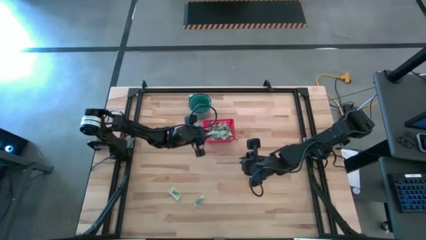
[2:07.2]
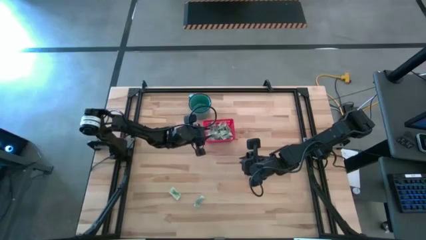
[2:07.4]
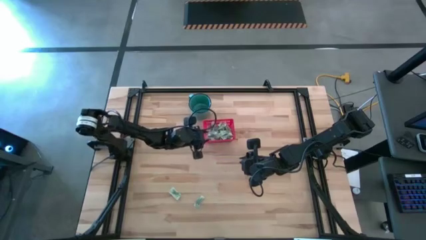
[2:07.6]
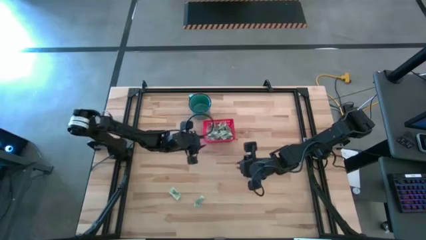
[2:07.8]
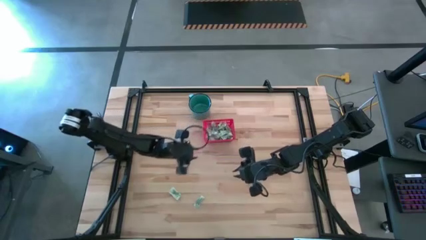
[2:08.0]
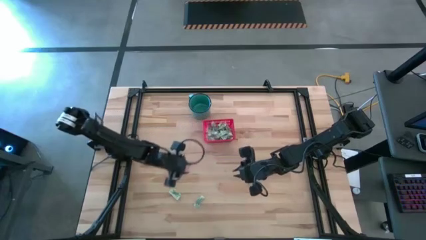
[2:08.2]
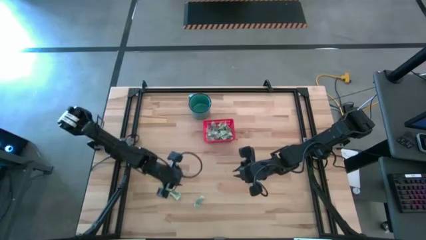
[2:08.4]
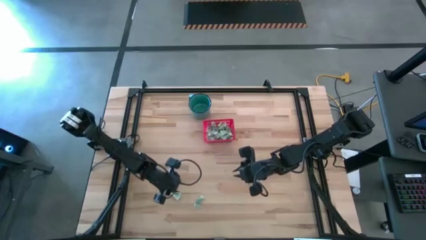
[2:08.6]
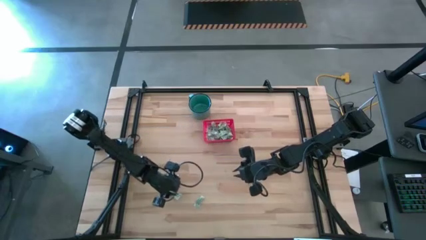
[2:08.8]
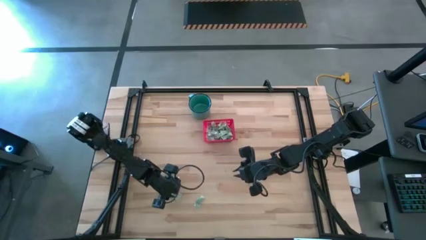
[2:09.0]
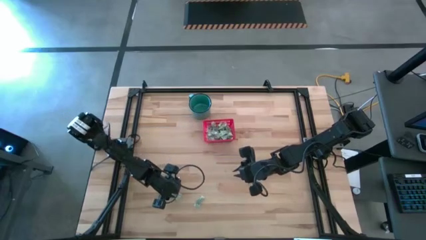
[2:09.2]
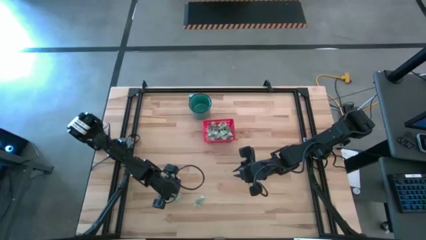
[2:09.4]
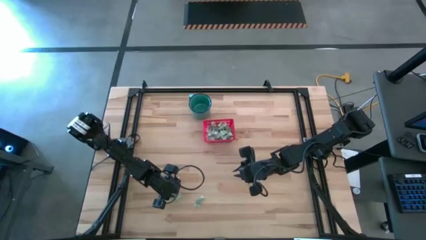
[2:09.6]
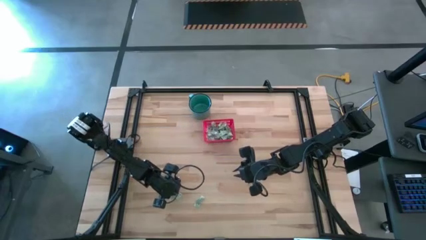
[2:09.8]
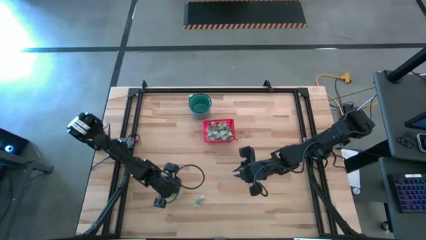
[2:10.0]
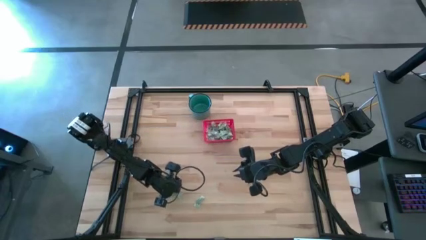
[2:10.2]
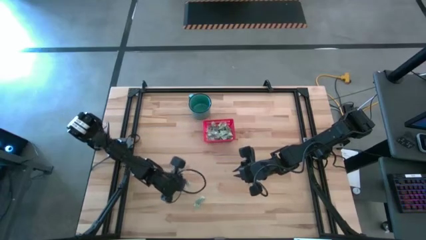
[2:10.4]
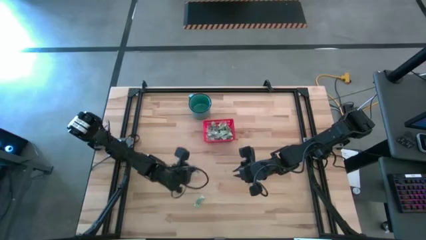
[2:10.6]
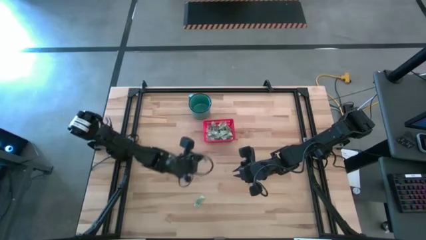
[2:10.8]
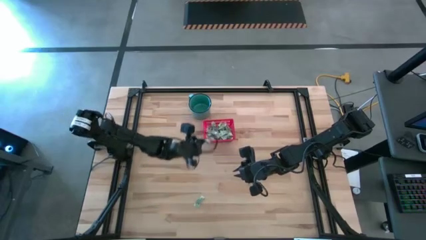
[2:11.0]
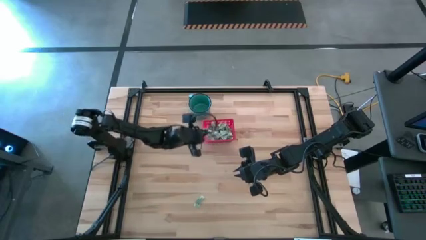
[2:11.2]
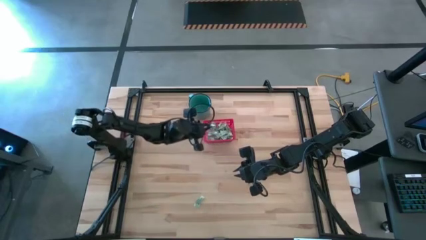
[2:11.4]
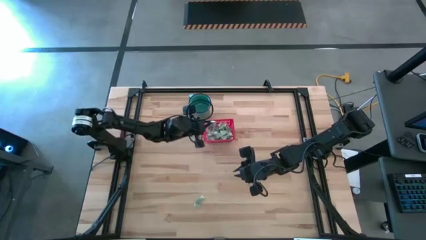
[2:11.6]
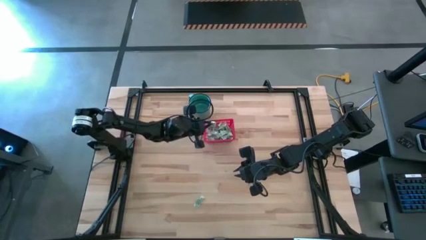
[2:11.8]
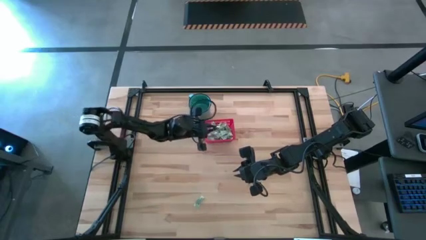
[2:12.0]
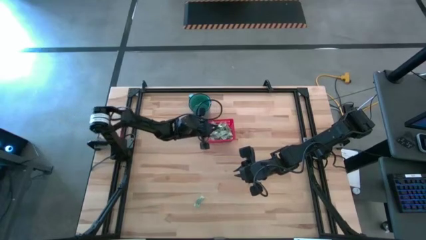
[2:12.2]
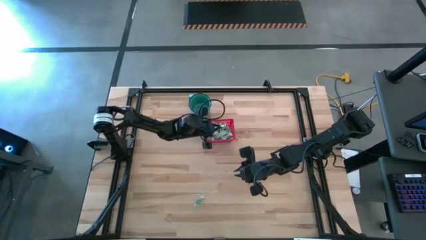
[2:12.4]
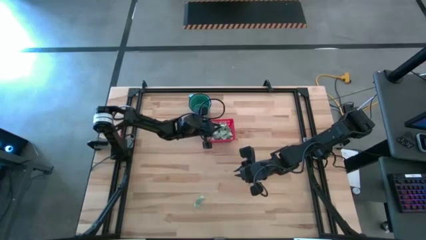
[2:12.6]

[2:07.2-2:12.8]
Task: Pick and place items into bin
Put the light green stevia packet into the red bin

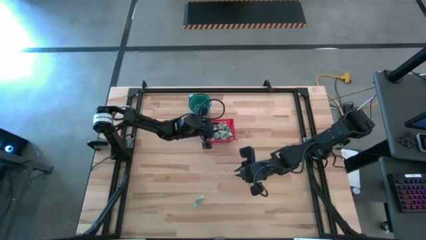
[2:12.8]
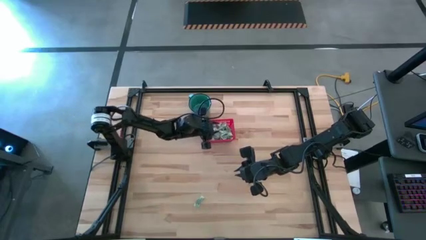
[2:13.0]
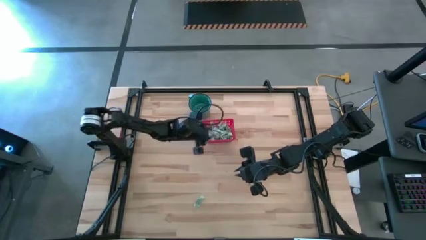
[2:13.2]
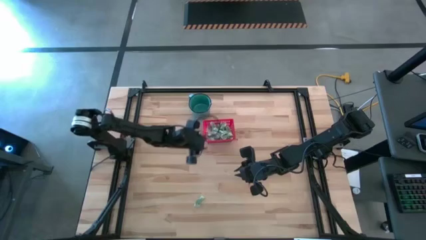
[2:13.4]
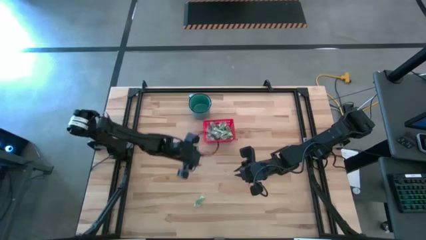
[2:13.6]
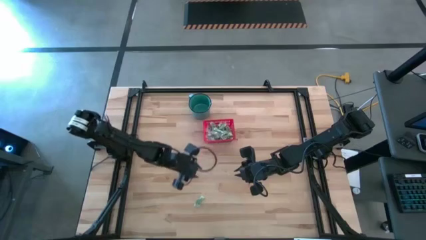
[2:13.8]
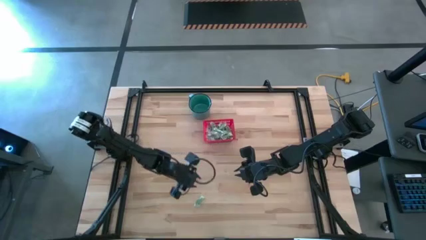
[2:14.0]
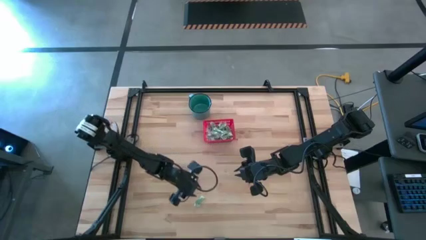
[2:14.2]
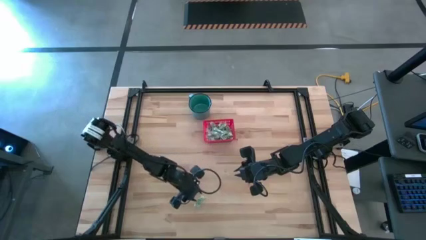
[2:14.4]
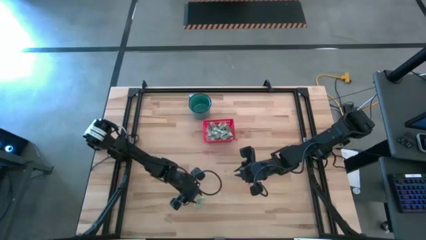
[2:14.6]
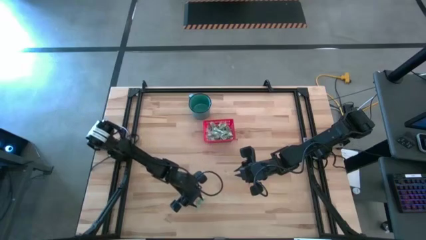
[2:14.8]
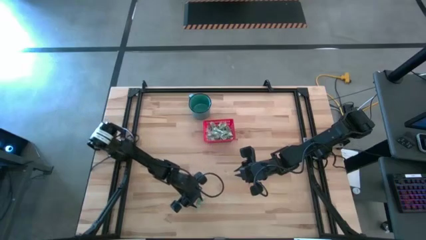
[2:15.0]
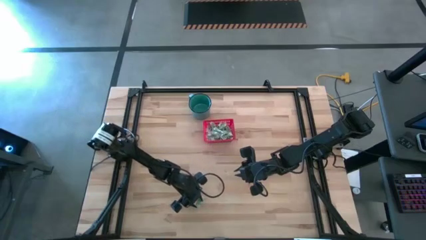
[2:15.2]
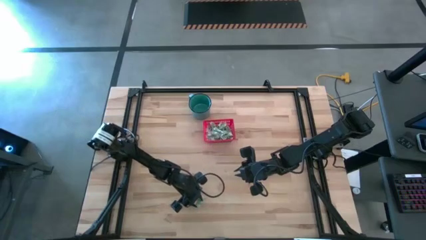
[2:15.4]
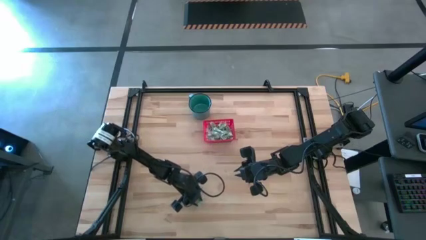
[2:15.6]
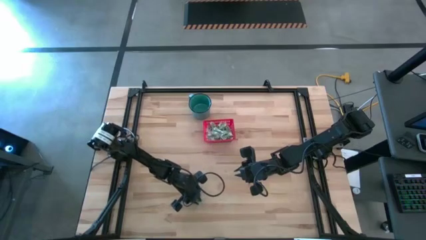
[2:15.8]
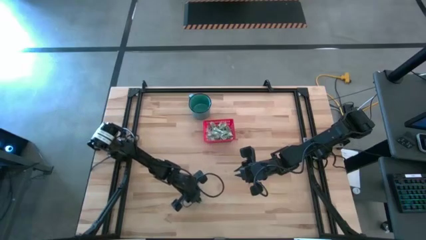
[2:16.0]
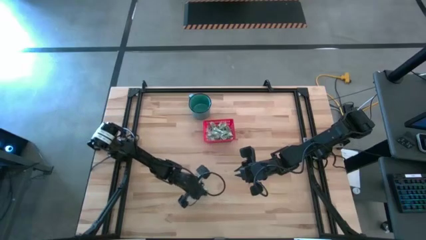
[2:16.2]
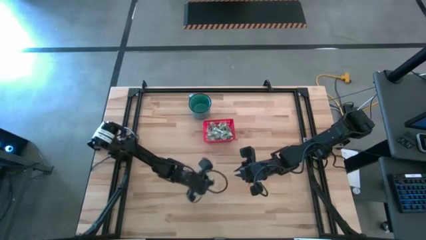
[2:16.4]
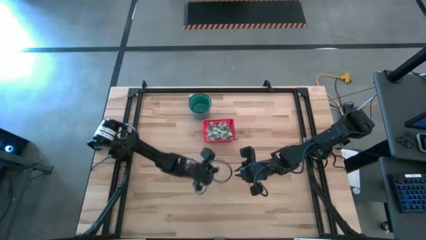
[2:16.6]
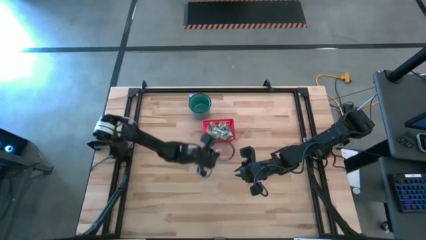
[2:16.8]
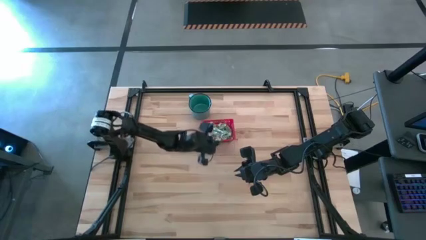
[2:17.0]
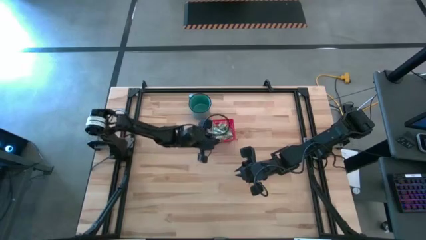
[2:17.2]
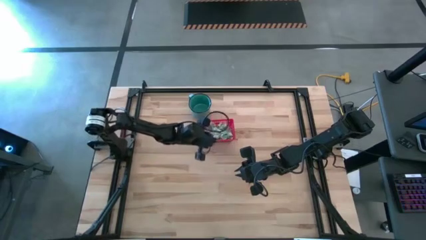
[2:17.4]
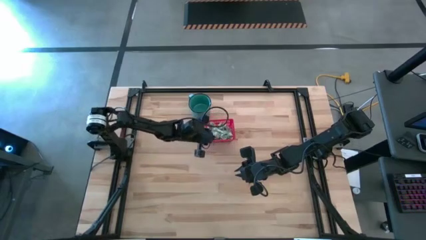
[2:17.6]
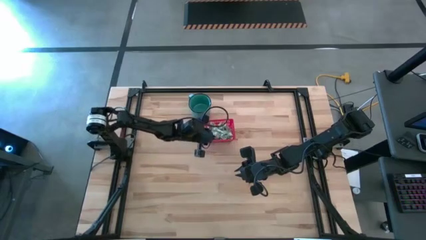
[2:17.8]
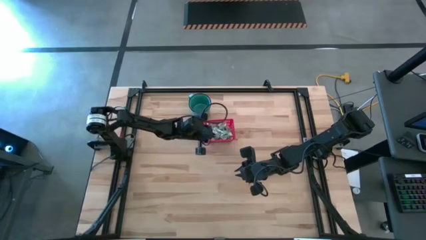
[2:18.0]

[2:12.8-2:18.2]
Put the light green stevia packet into the red bin

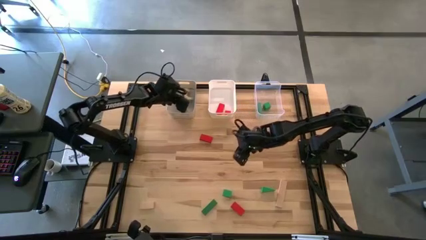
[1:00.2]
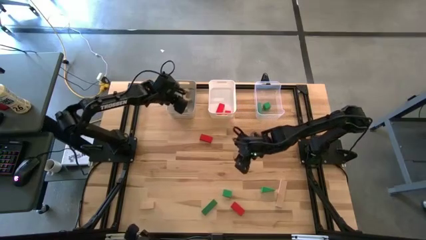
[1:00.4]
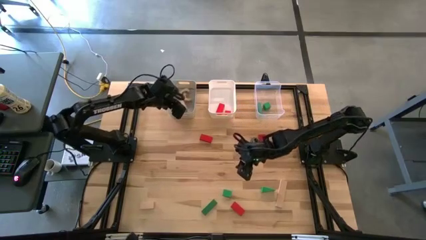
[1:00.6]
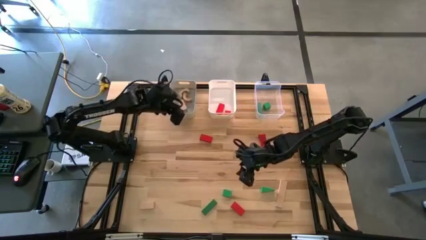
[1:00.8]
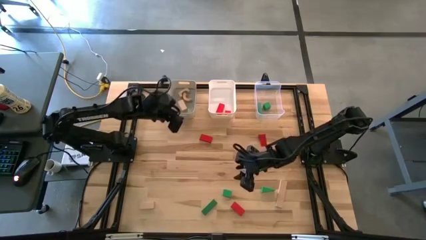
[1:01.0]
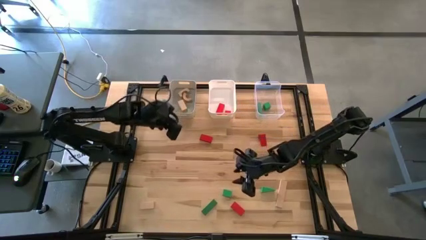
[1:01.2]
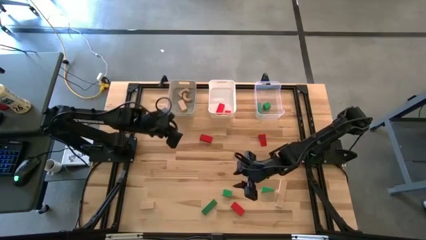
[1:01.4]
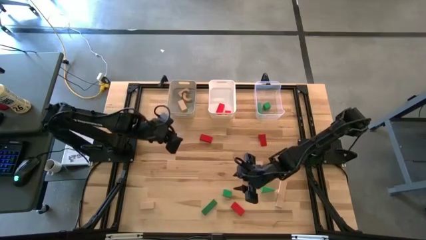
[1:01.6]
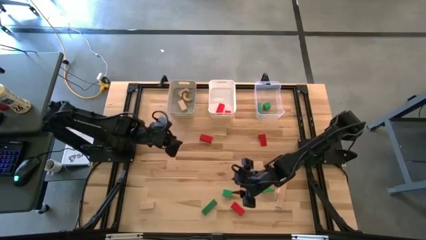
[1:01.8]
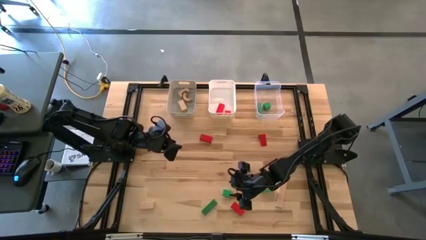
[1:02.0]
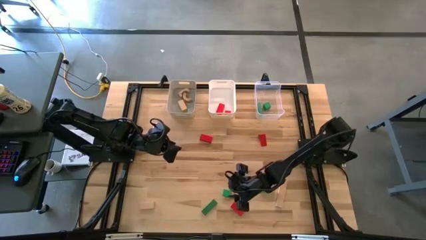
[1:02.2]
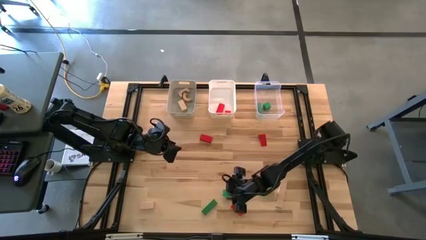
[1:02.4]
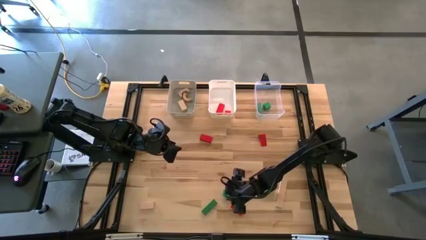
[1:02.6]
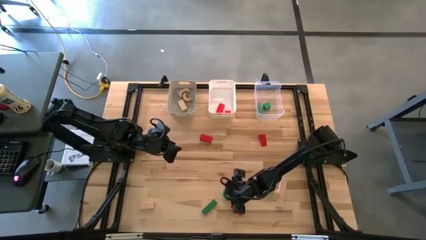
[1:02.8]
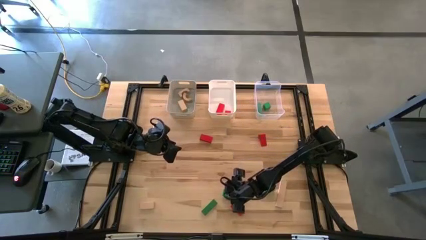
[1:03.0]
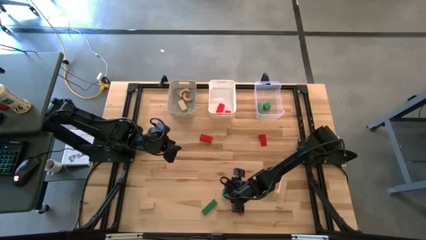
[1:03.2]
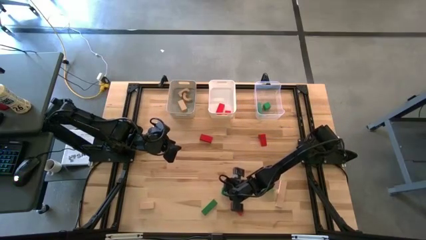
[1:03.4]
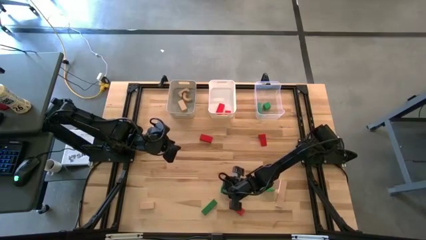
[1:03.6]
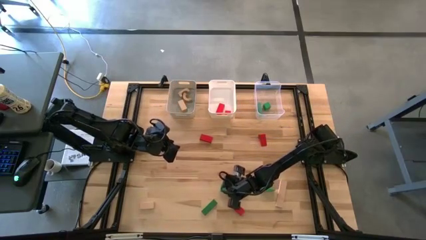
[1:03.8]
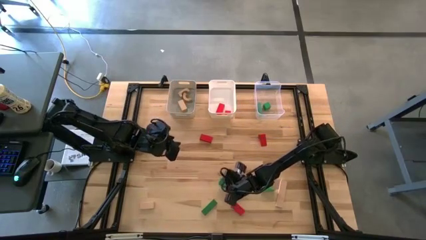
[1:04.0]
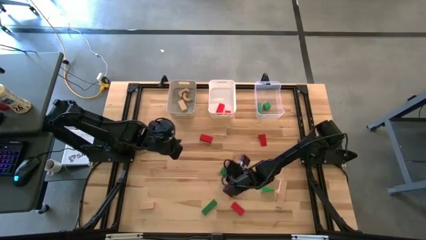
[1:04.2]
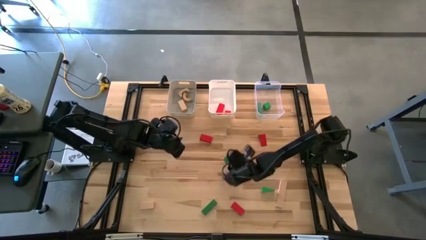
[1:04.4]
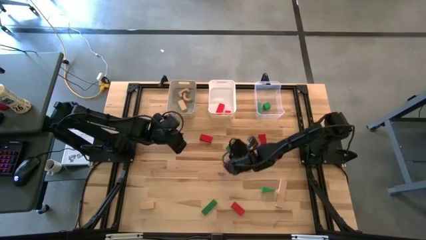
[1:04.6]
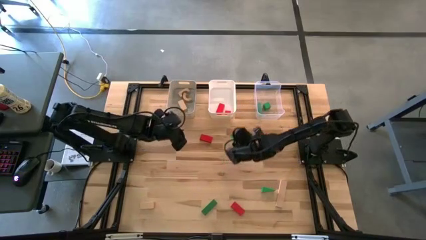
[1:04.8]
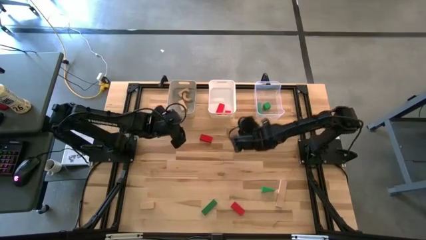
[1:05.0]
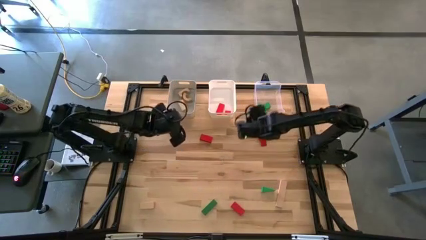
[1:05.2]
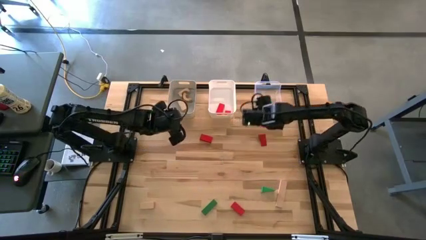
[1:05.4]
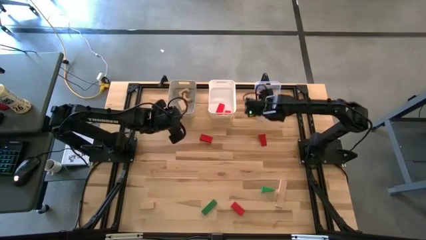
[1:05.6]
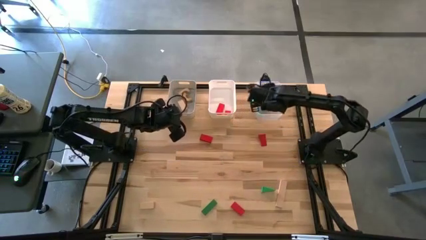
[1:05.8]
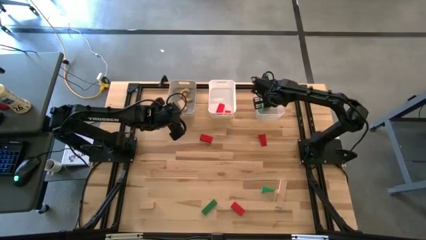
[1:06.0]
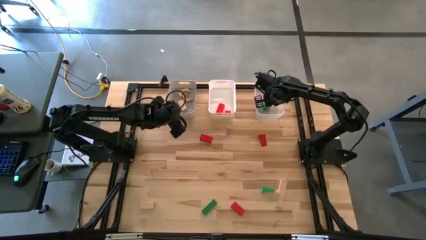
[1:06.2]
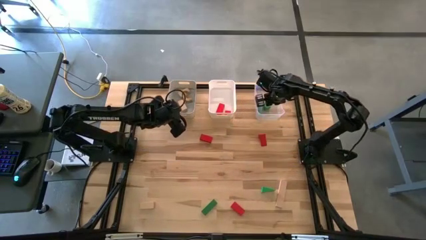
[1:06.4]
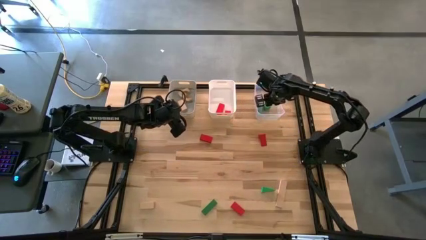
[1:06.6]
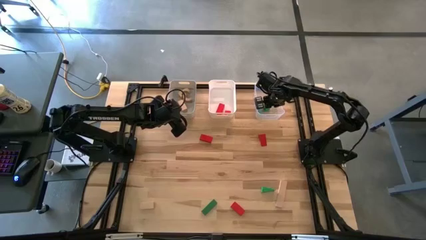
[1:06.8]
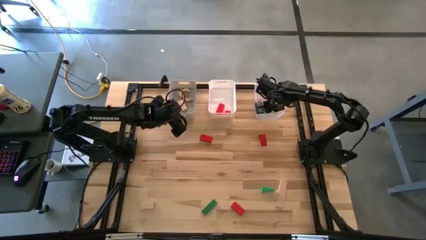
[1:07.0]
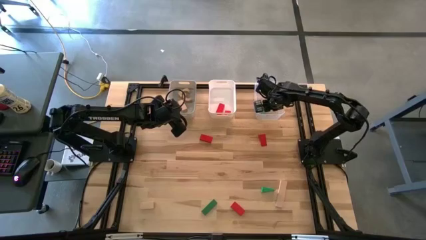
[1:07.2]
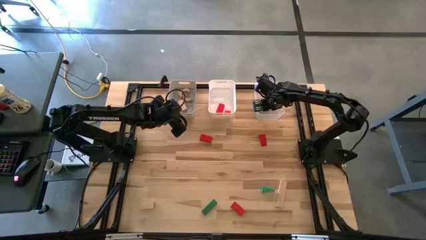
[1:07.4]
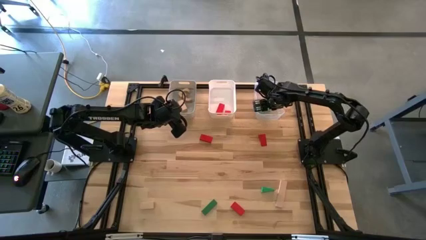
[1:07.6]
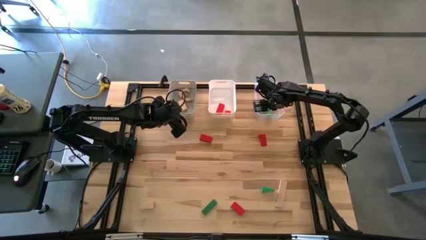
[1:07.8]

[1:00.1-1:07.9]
Task: Sort & place blocks by color
Put the center green block into the transparent bin
